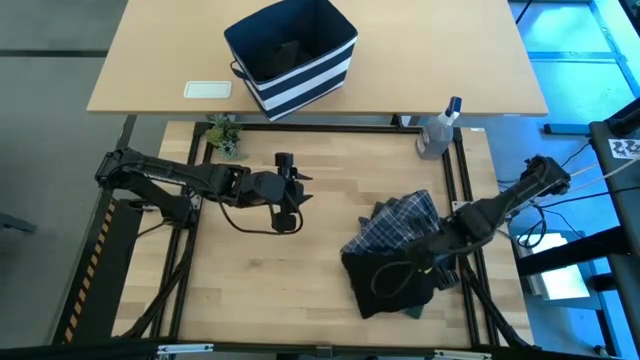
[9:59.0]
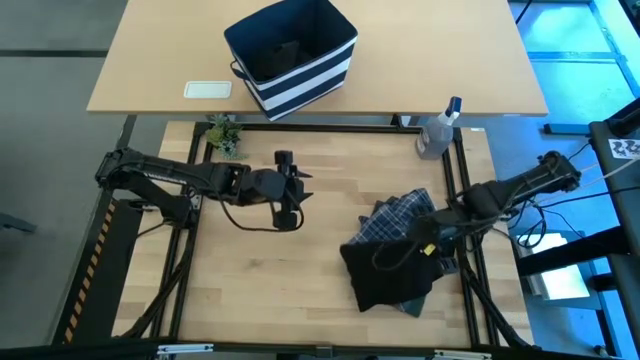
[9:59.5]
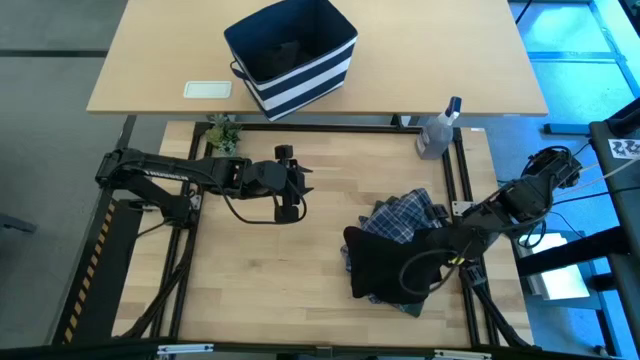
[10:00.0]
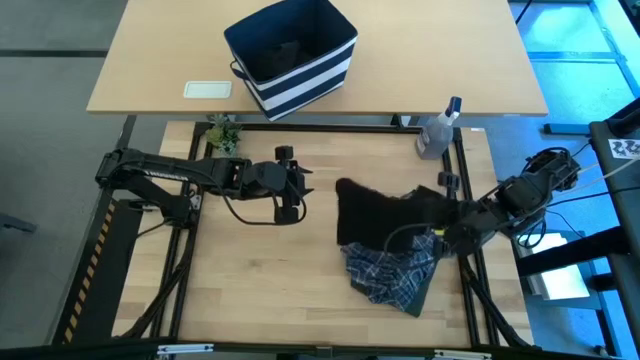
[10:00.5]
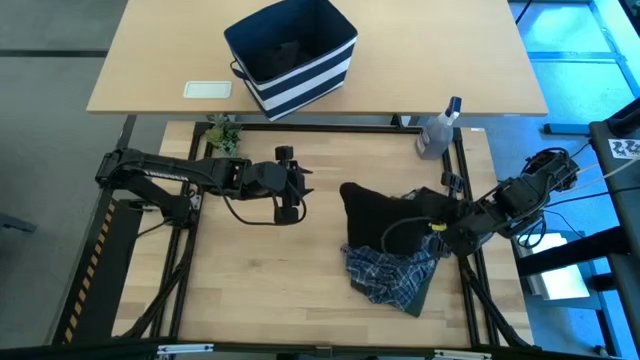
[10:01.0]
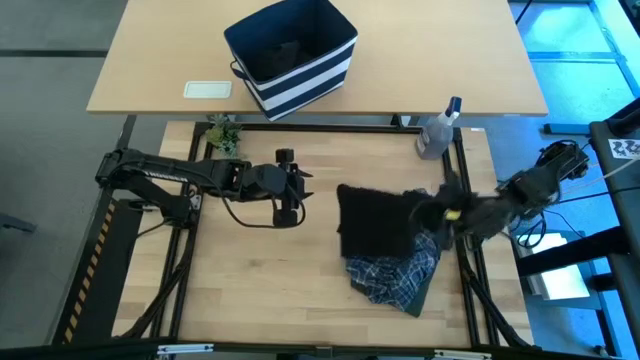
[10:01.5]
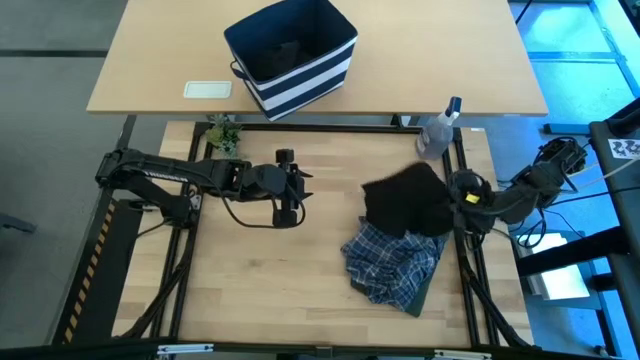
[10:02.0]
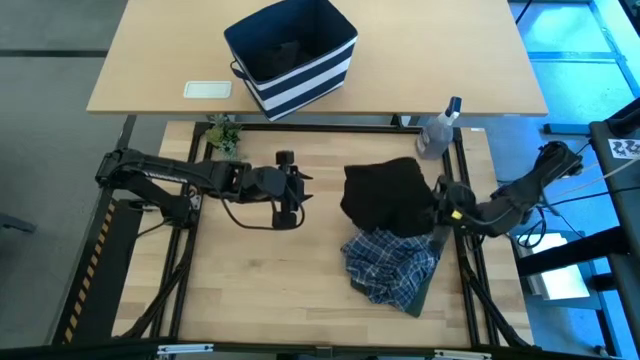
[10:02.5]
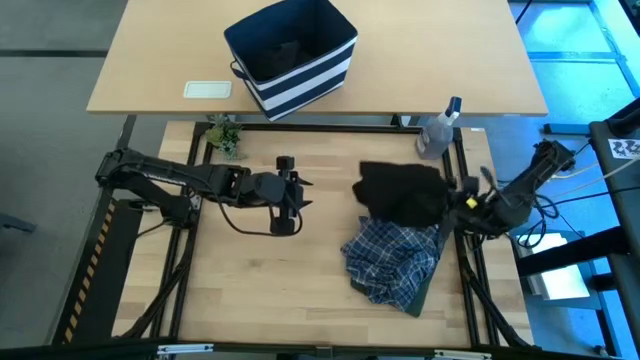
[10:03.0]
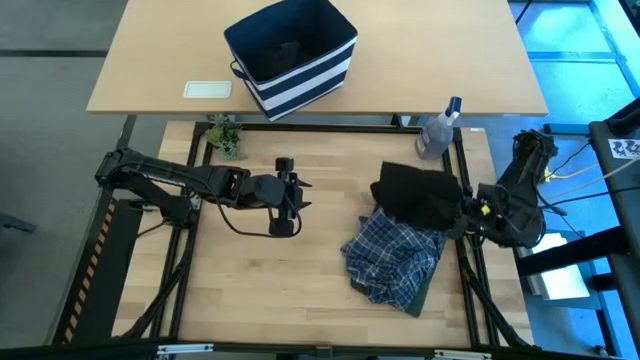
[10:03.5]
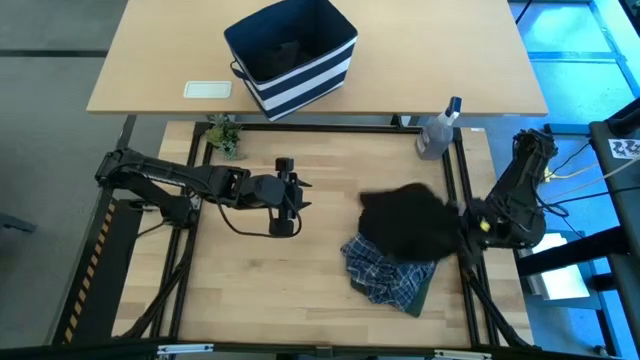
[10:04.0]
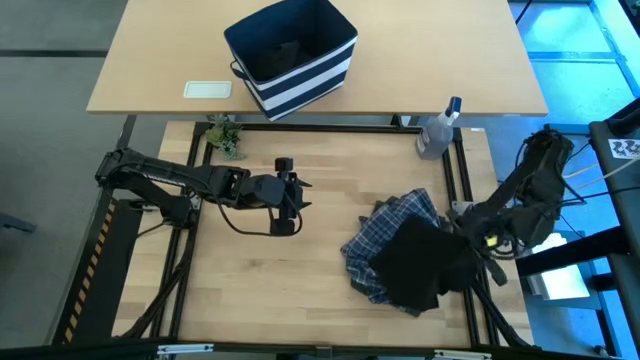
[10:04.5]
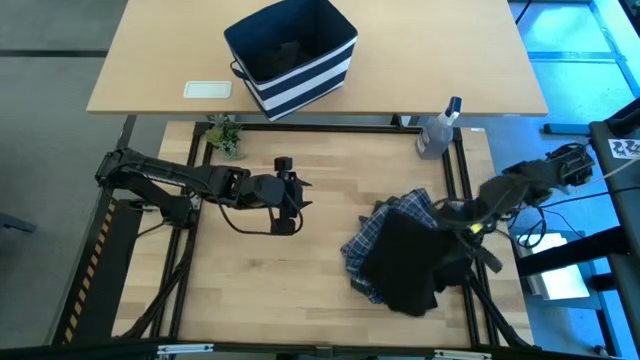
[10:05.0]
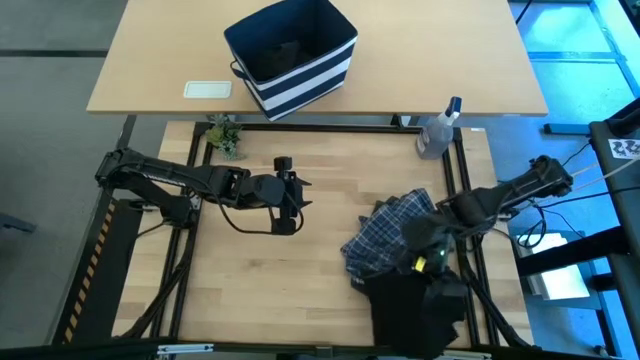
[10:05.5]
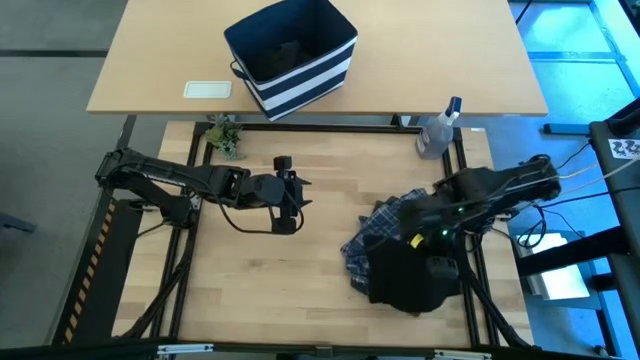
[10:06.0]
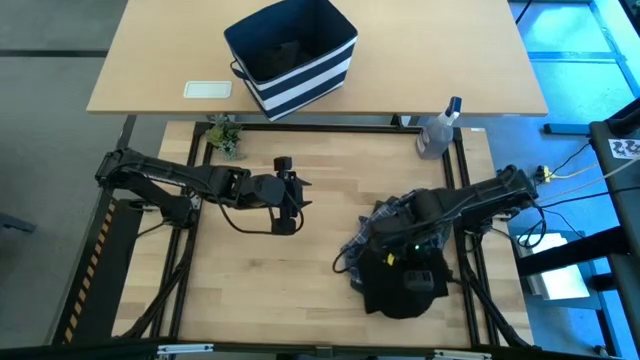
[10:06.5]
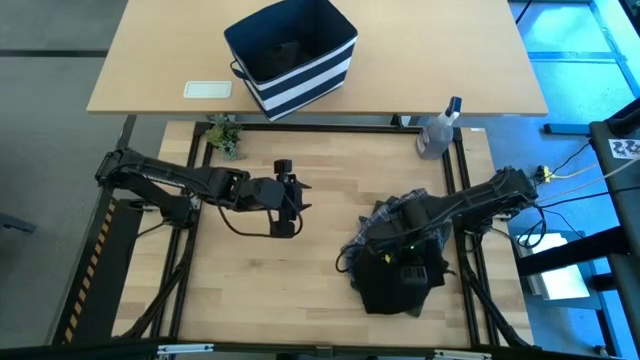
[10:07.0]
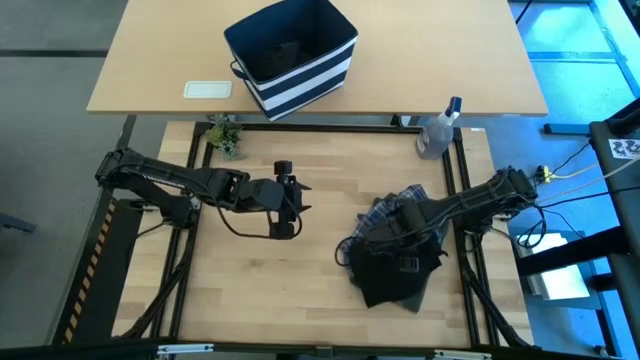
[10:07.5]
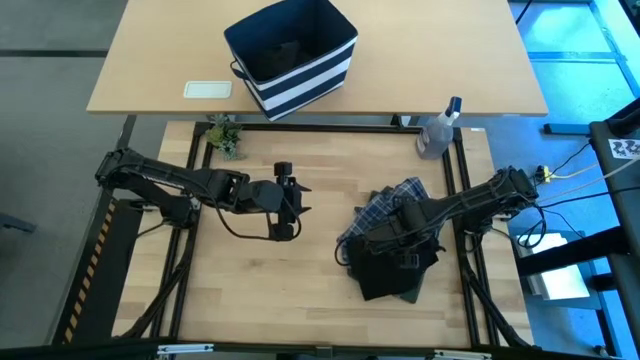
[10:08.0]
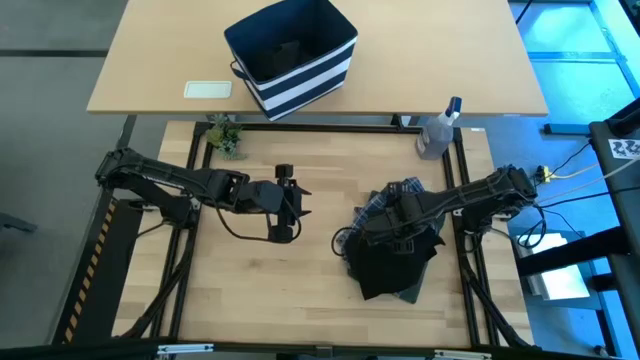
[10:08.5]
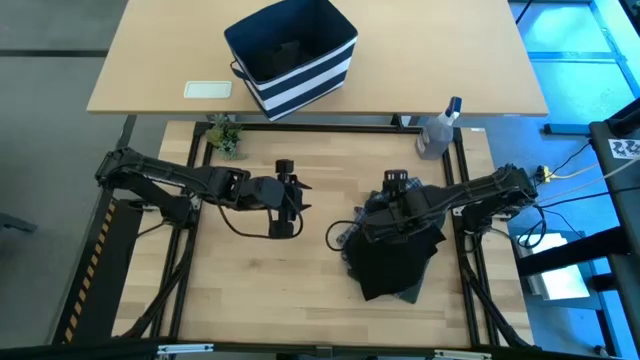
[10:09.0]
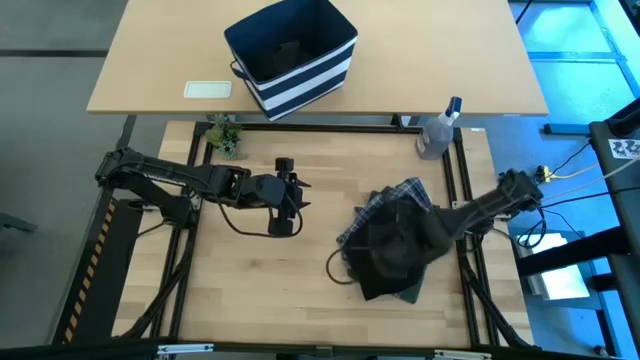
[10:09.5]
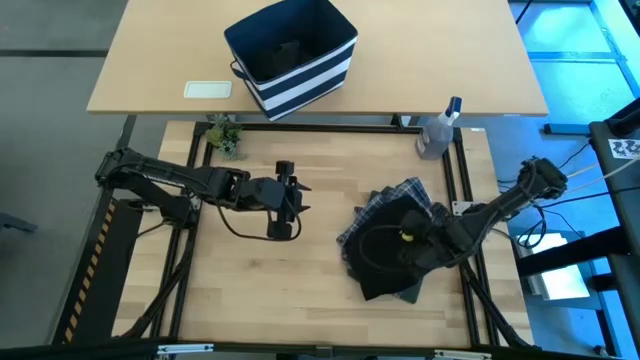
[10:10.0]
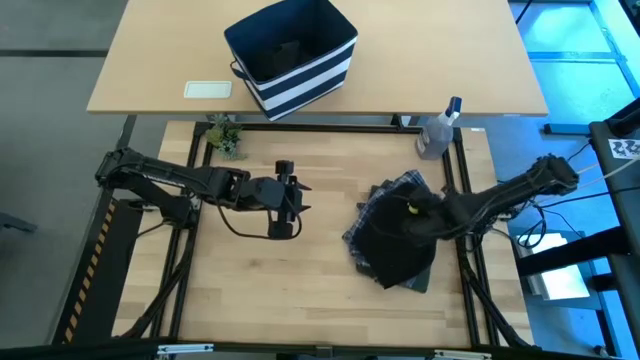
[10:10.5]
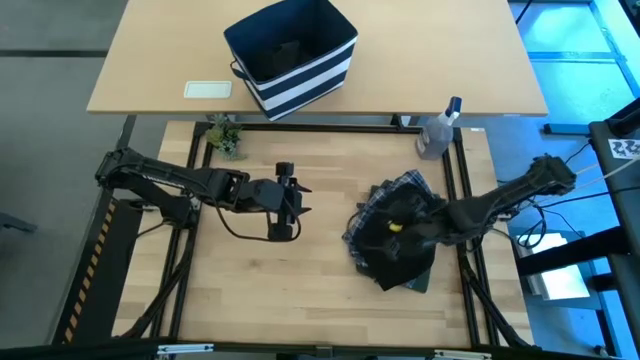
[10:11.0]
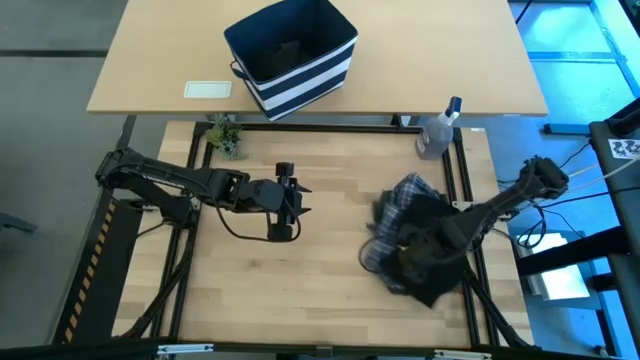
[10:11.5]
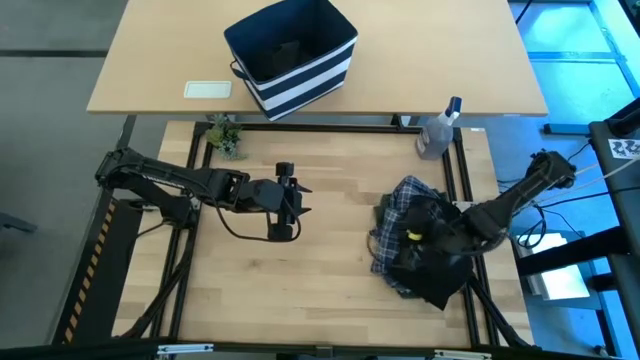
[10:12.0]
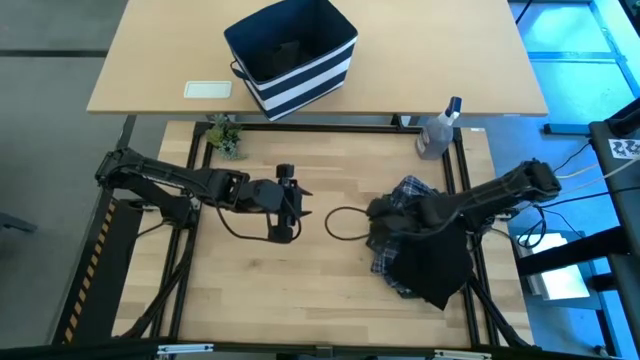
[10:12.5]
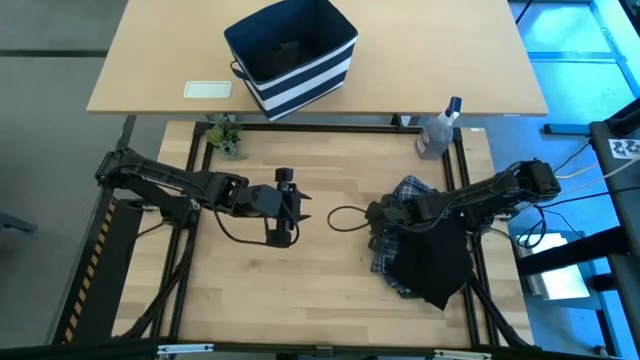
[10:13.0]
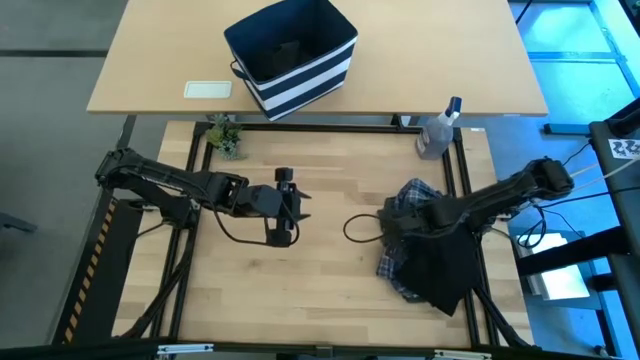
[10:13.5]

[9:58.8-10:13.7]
Task: Fold Laundry from Bin
Stack the folded black shirt on top of the folded blue checkered pants

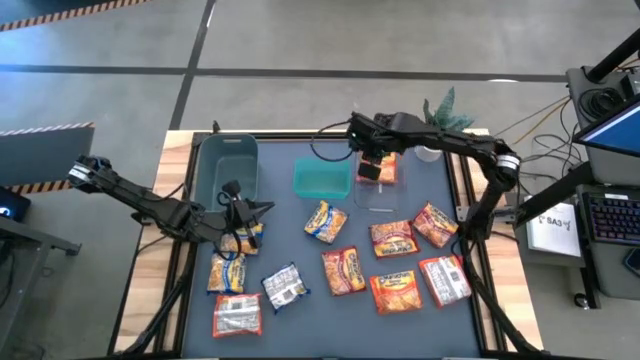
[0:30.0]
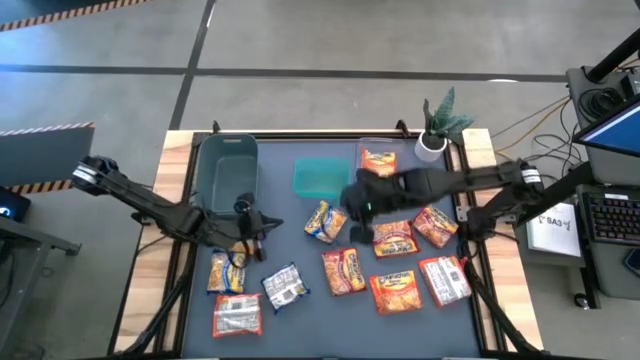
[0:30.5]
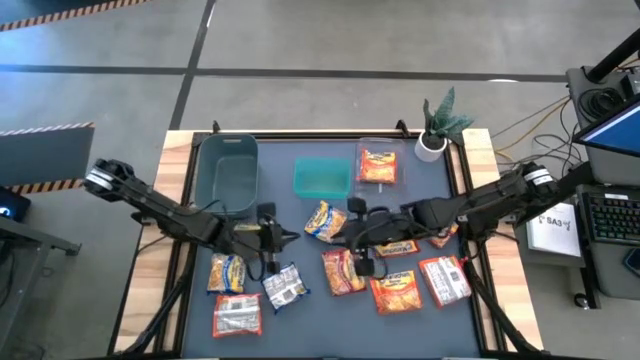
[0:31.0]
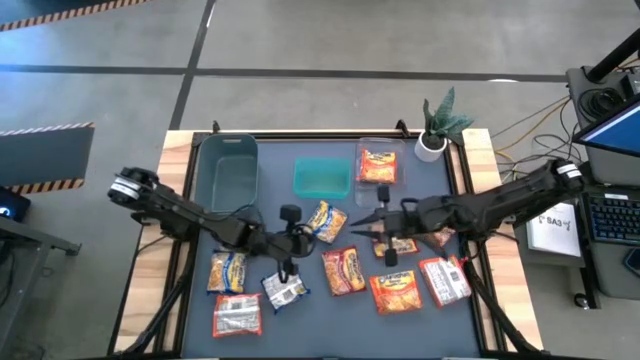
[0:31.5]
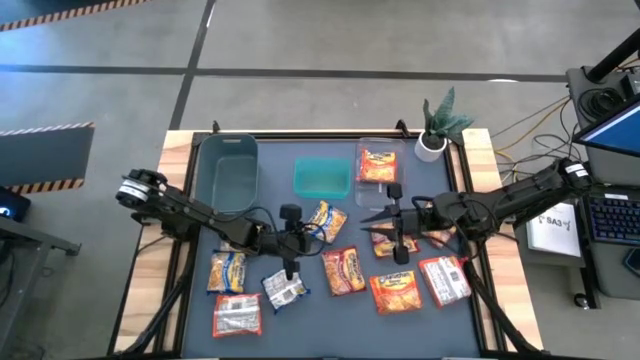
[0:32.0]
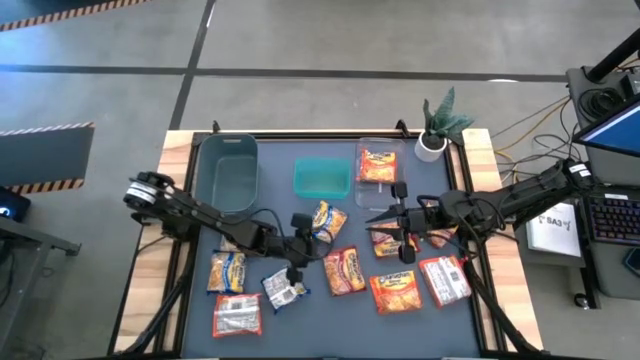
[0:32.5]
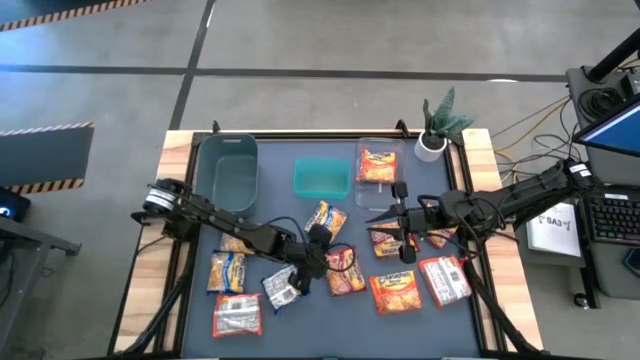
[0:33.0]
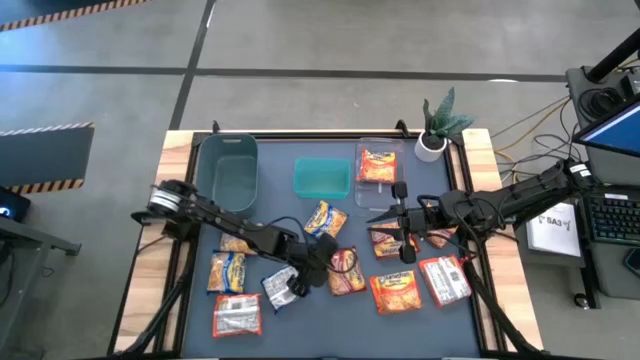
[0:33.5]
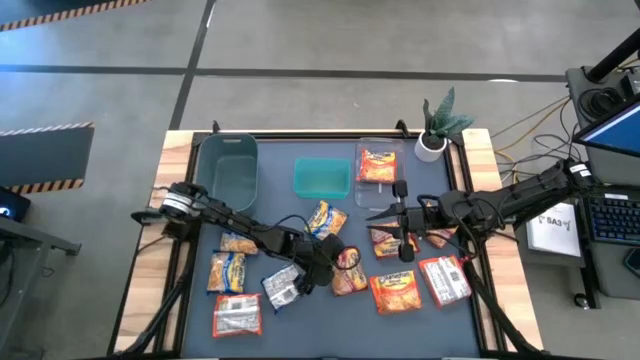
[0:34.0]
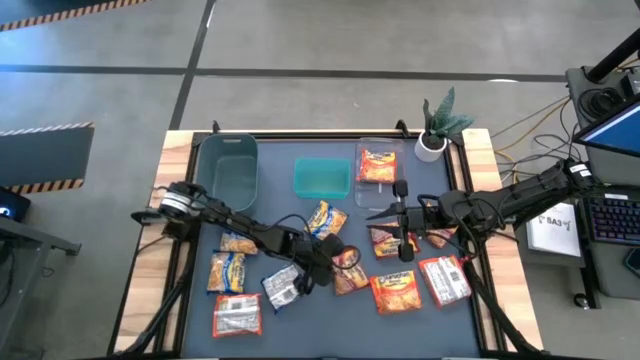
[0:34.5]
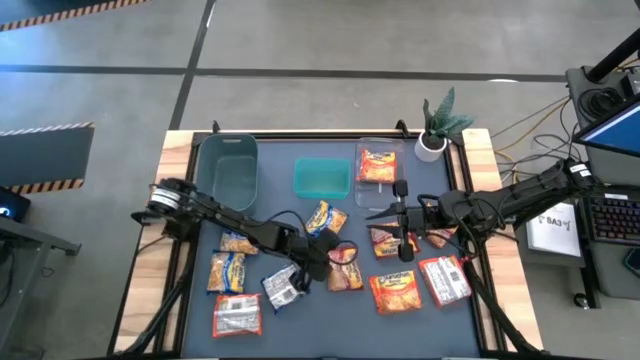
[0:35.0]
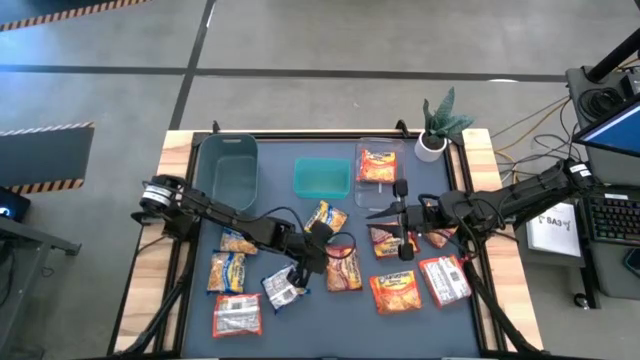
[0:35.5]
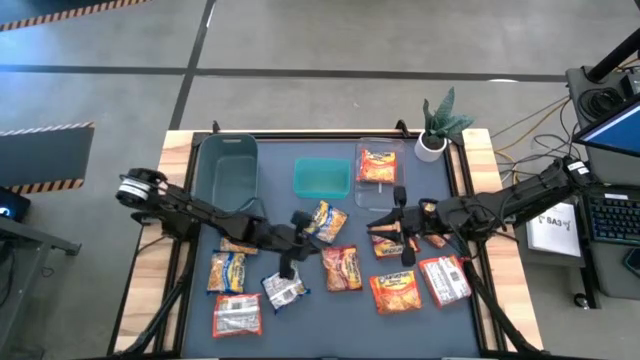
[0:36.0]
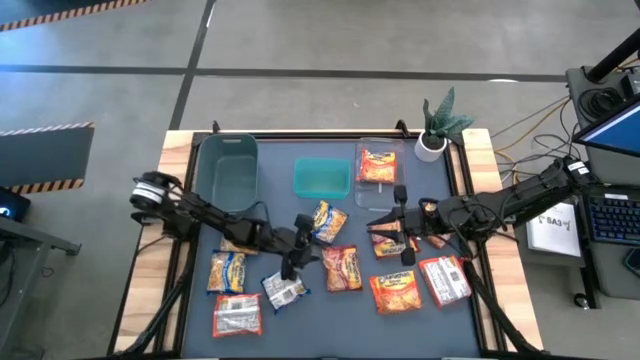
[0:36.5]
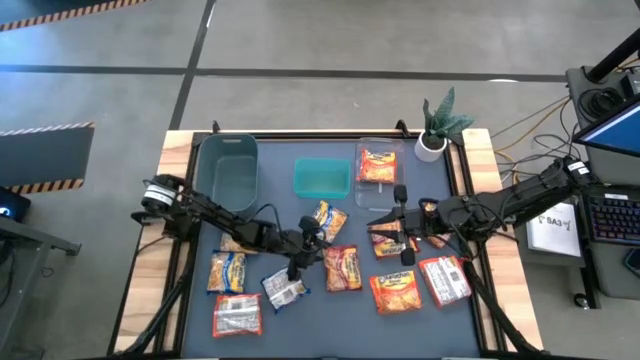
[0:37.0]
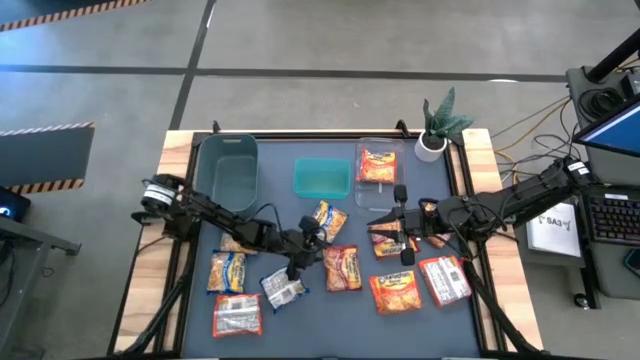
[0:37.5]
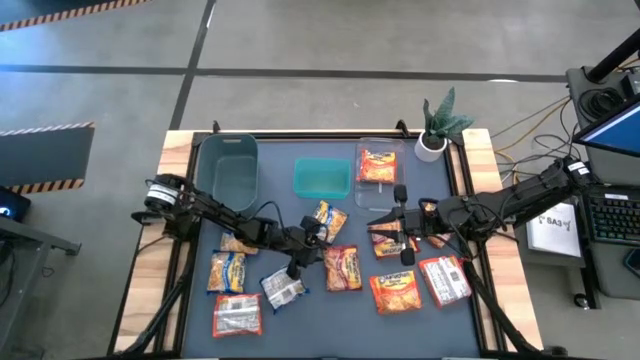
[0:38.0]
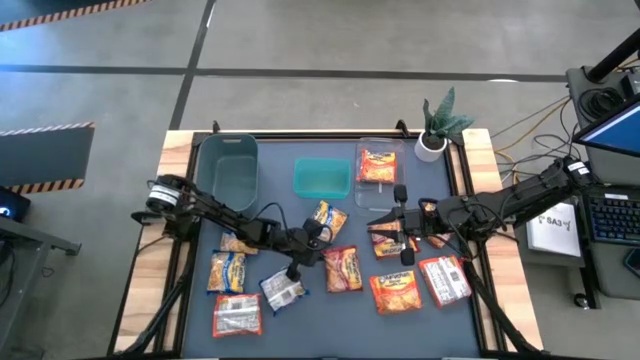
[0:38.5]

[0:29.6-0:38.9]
Task: Sort Maruchan noodles
Put the red noodle pack into the light blue bin
